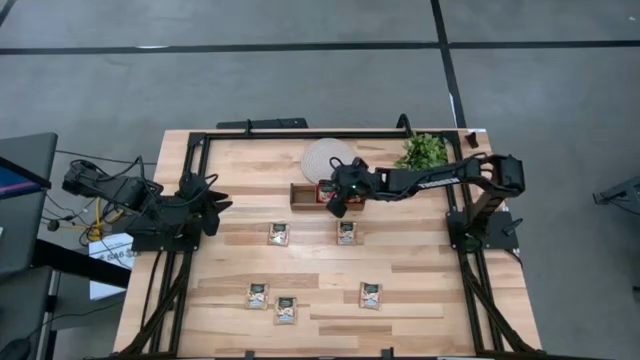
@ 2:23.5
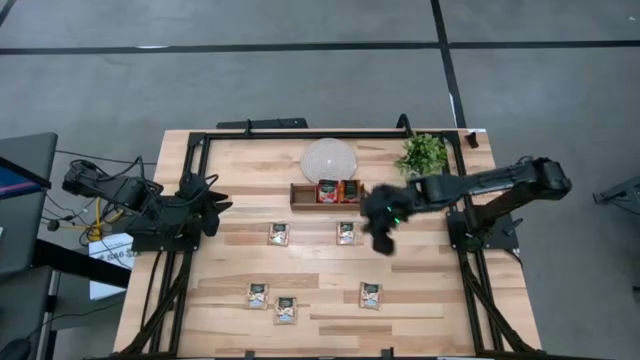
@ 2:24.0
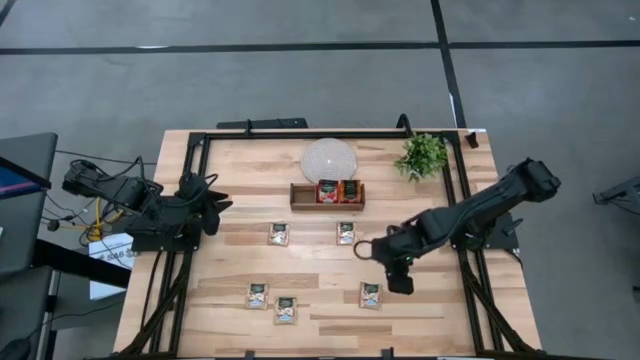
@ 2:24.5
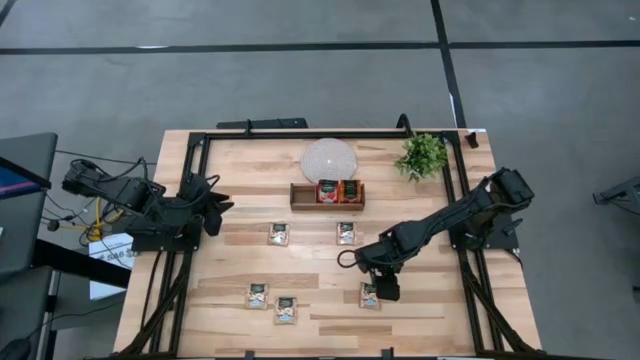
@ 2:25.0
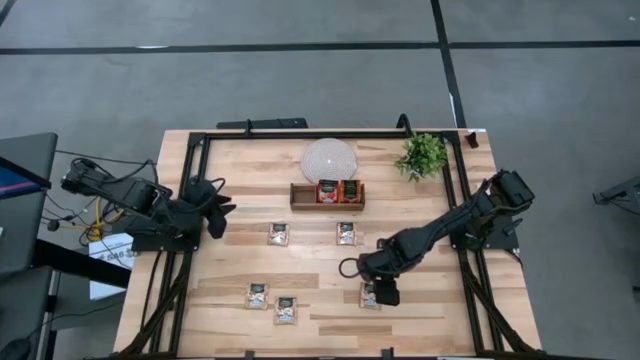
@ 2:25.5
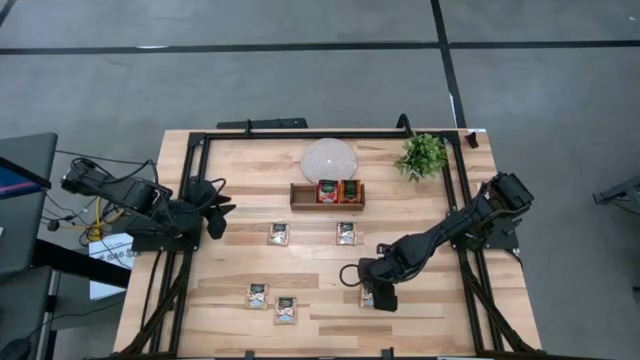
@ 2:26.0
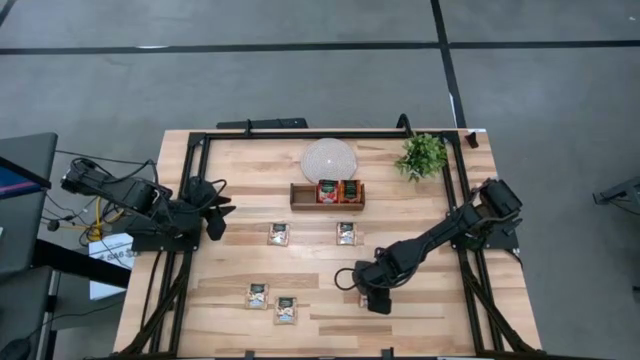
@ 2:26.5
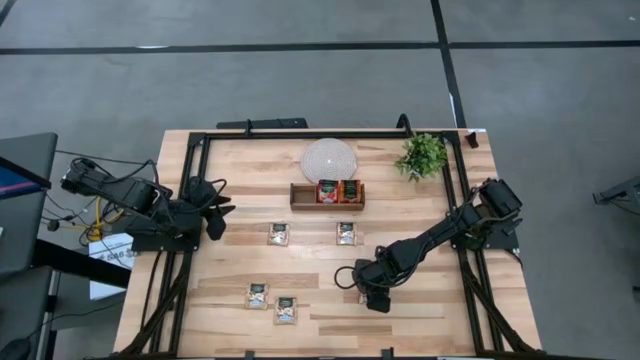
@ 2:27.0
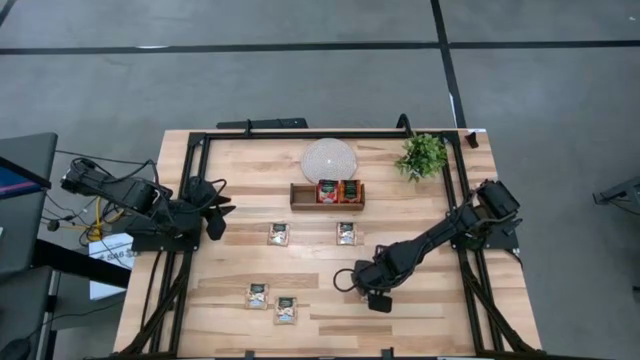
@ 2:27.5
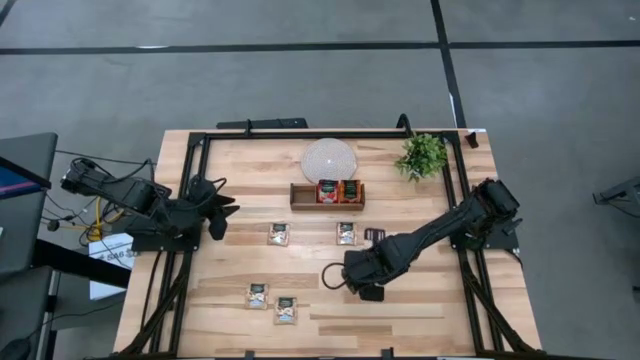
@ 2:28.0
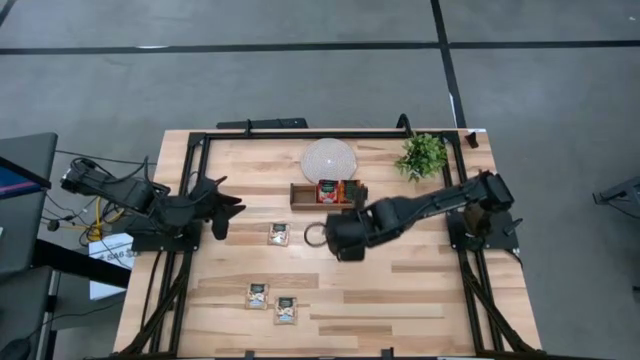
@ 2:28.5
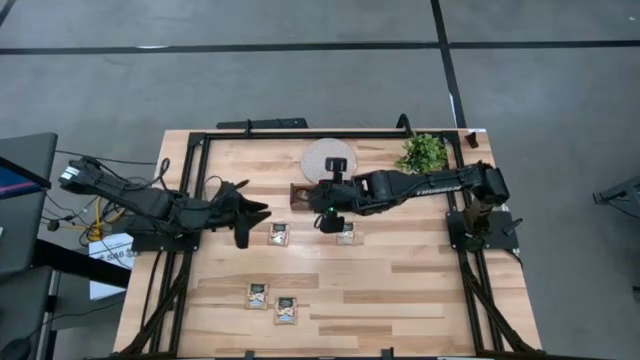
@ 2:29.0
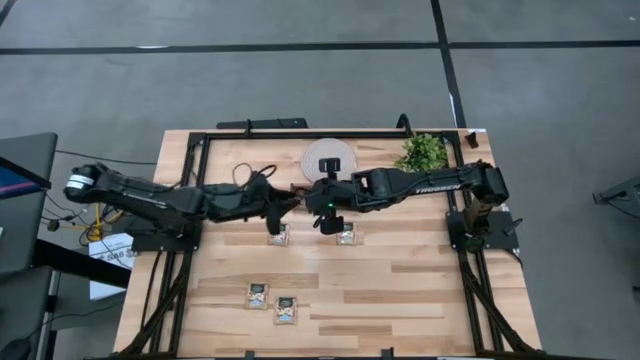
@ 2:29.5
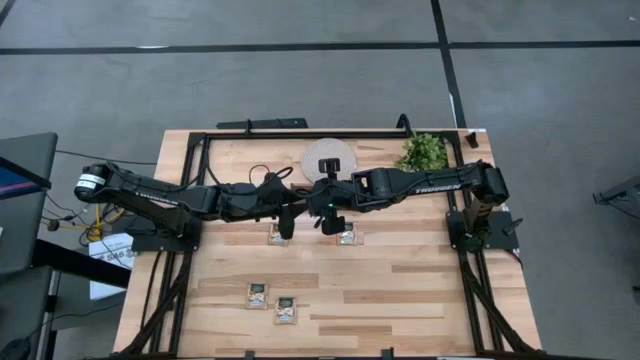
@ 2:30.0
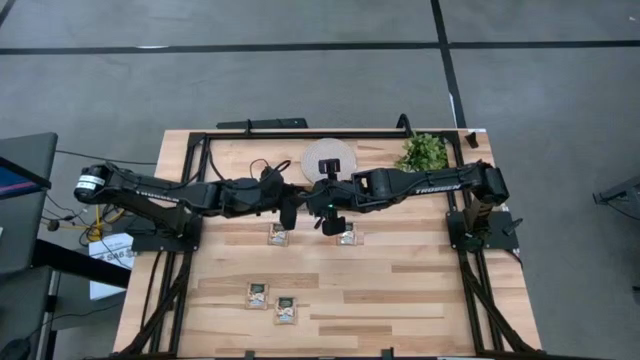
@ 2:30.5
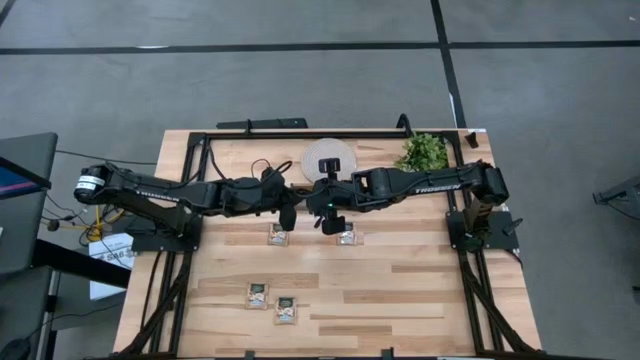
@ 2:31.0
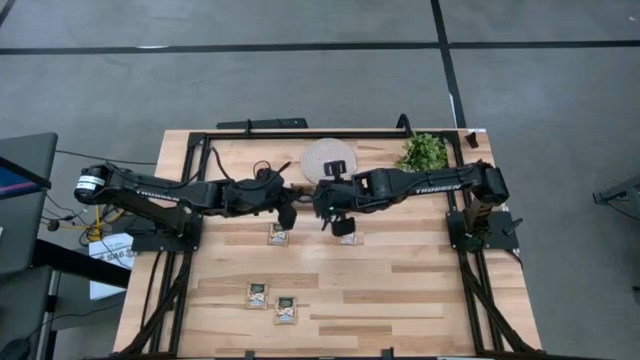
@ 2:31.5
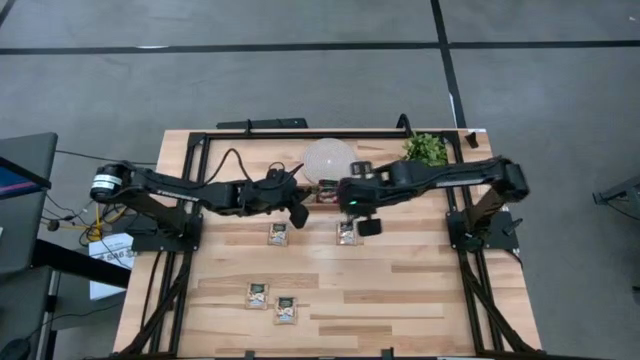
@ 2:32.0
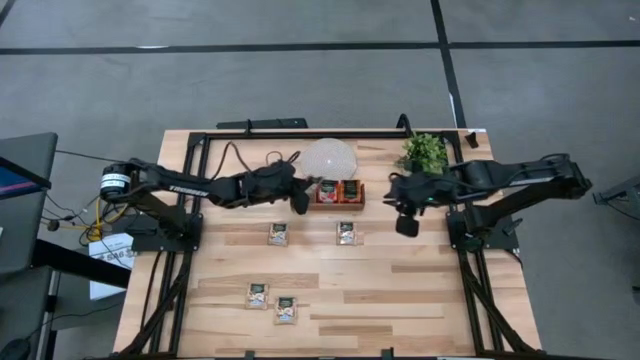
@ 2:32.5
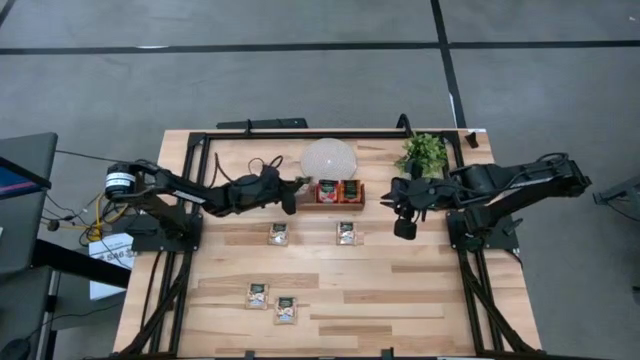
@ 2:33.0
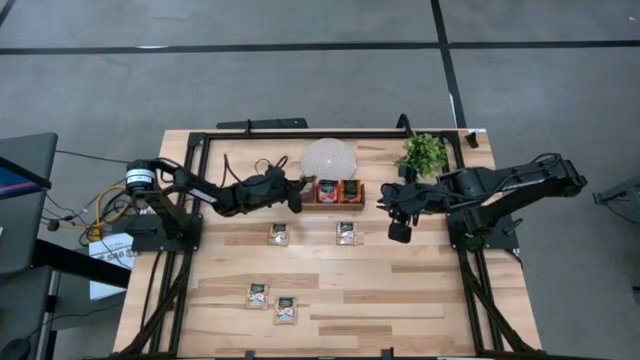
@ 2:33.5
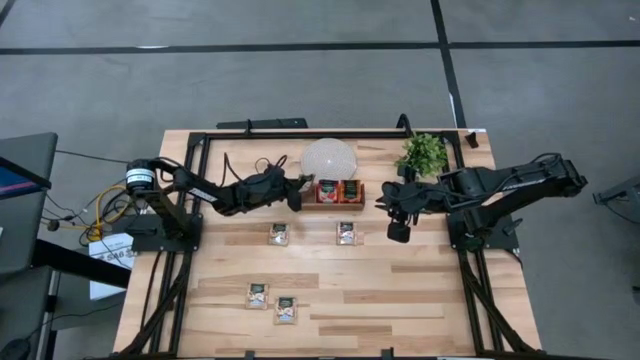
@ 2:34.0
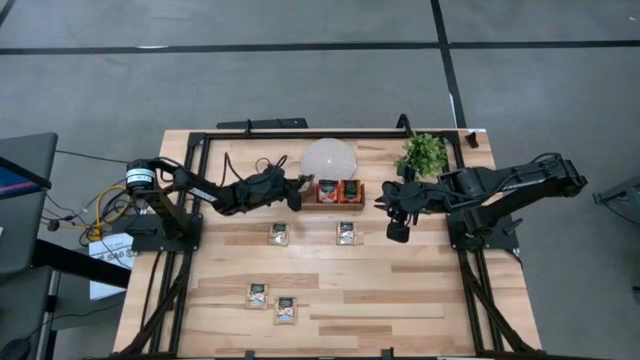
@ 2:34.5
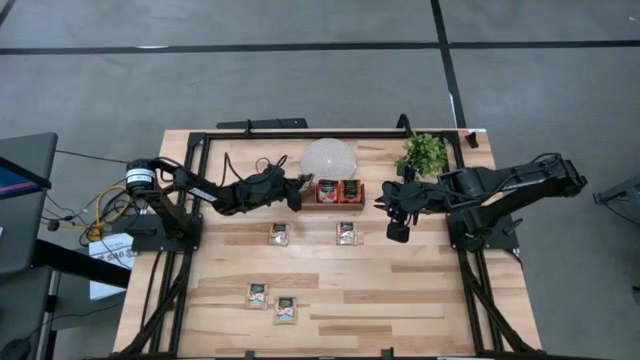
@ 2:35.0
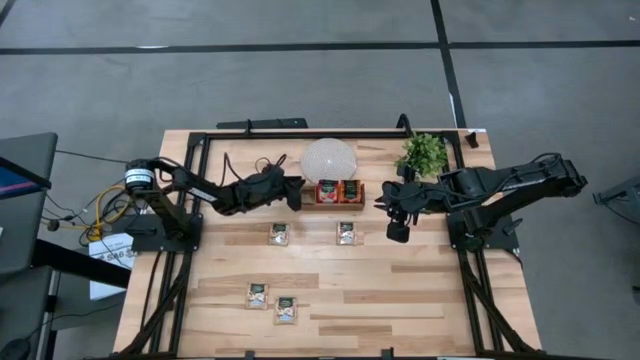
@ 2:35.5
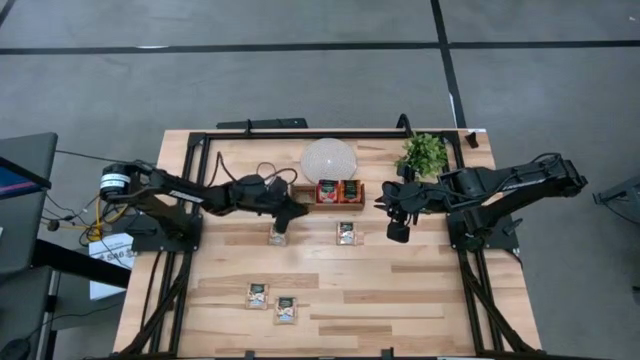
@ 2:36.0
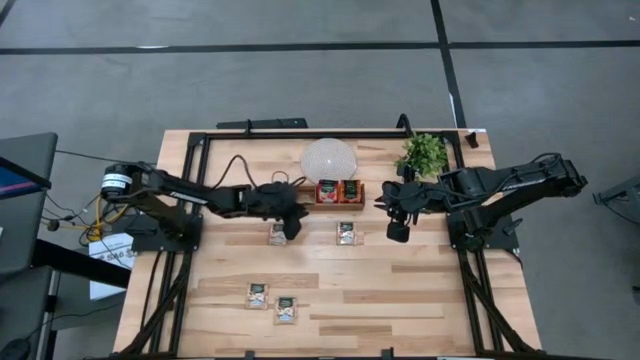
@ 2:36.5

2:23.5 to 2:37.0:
Task: Pick & Place Tea
Put the brown tea bag into the left compartment of the wooden organizer

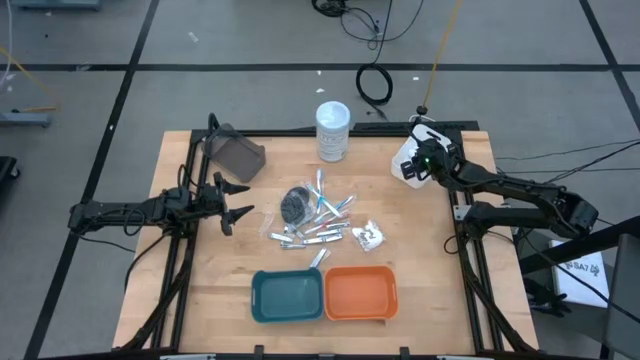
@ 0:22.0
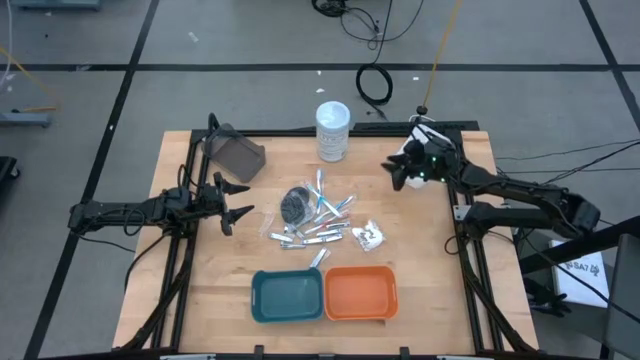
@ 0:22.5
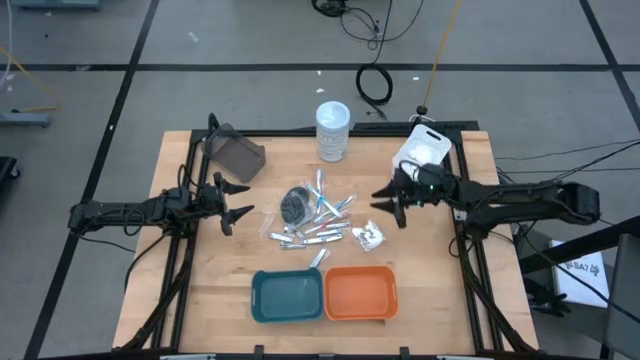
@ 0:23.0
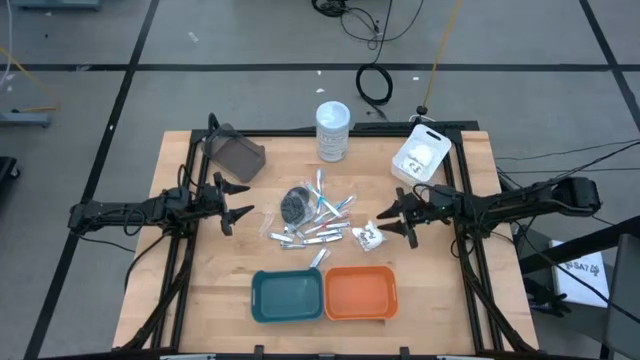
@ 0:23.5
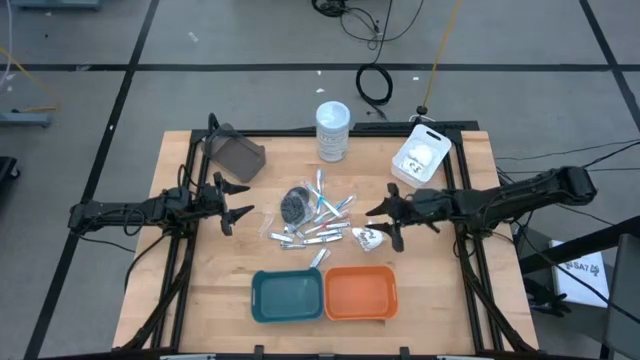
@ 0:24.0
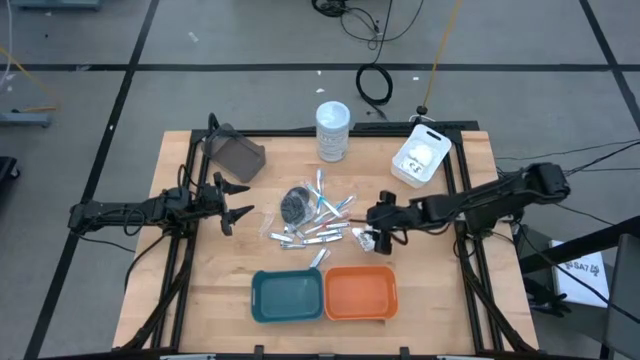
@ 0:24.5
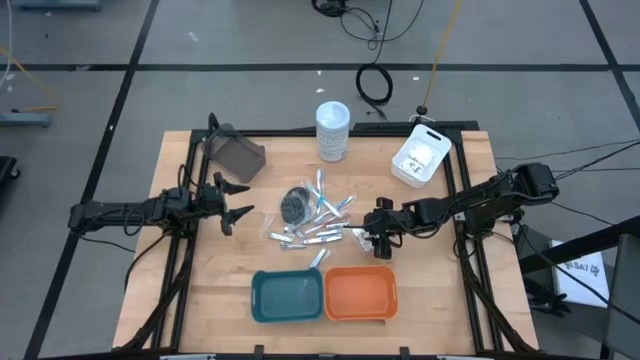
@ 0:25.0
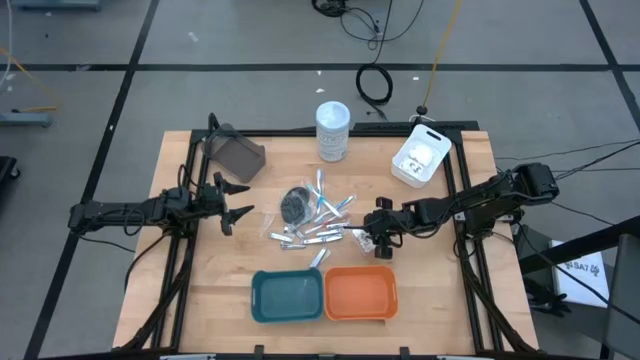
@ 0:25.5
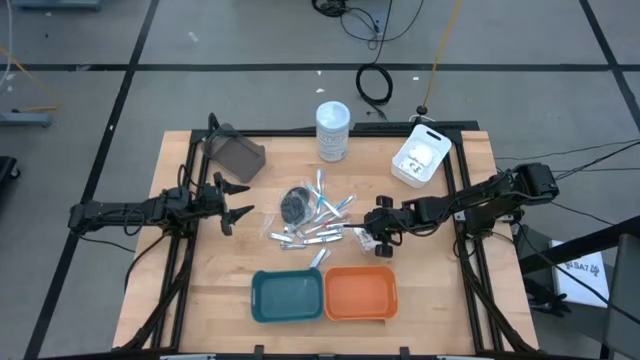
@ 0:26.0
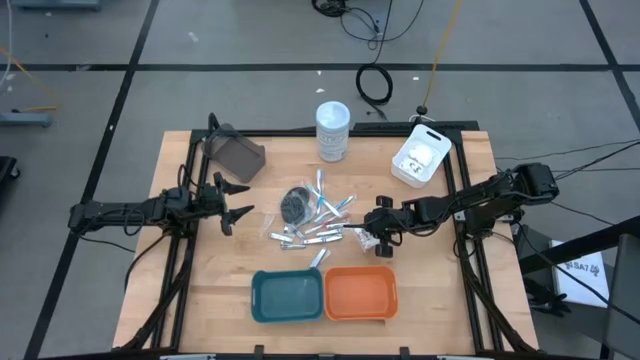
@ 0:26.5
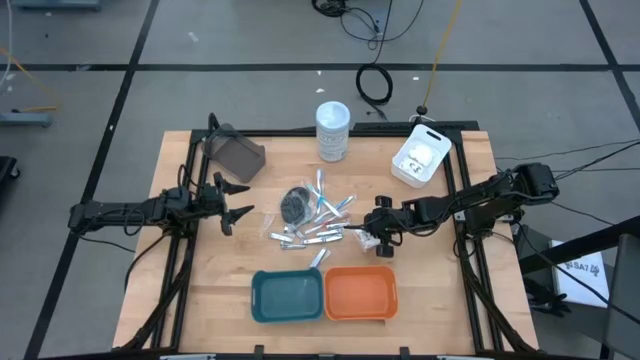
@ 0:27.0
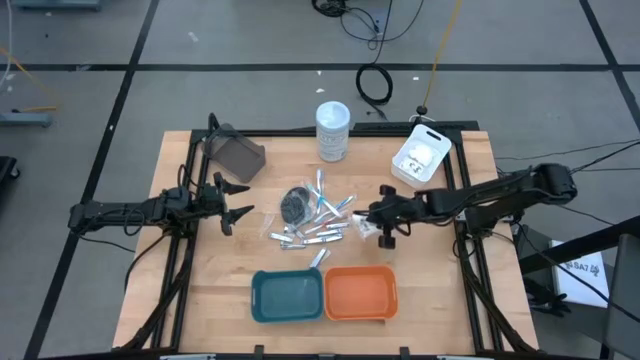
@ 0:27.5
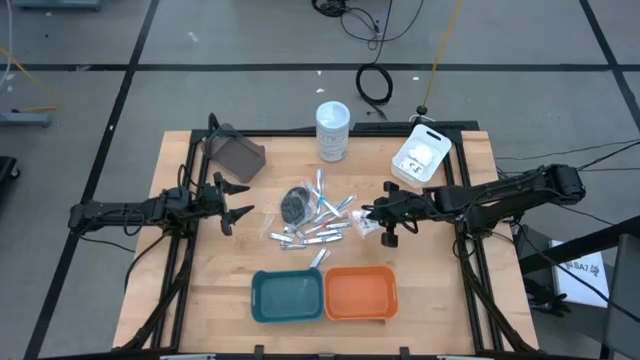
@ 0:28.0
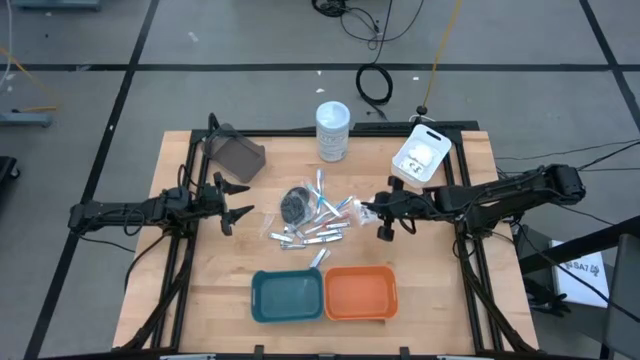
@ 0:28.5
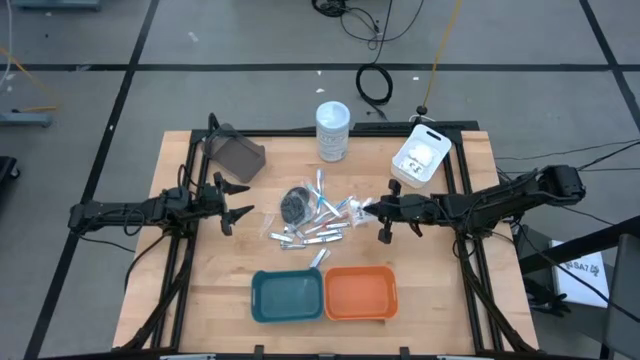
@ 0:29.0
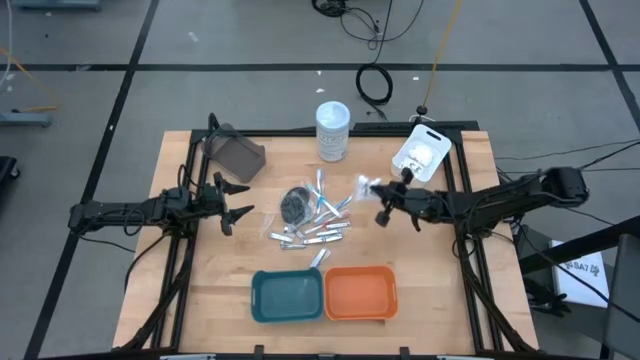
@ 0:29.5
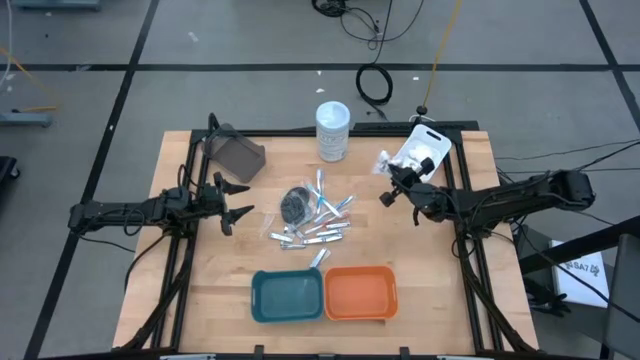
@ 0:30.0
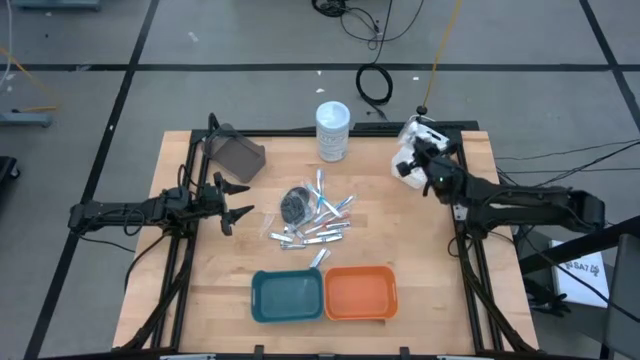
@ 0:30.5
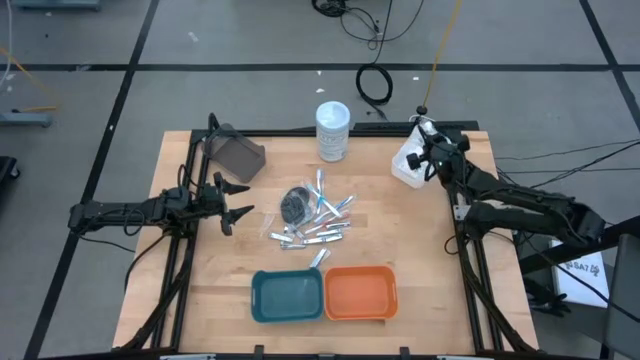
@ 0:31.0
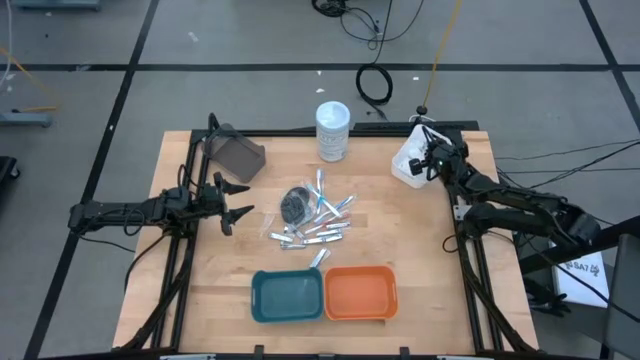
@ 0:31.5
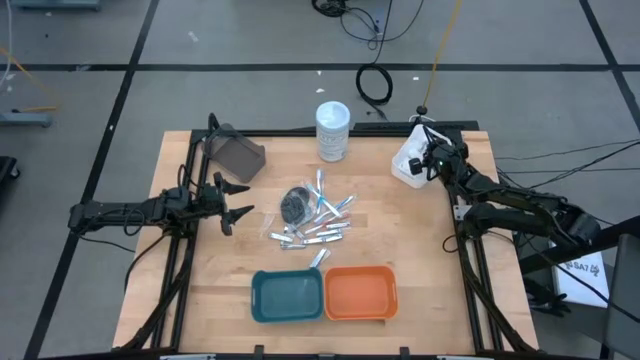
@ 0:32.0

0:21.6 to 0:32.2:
Task: Pick & Place Travel size toiletries
Put the white cotton pack into the white bin
